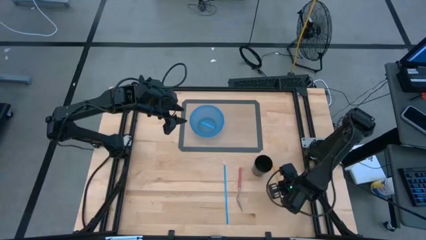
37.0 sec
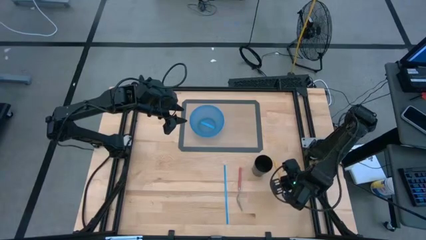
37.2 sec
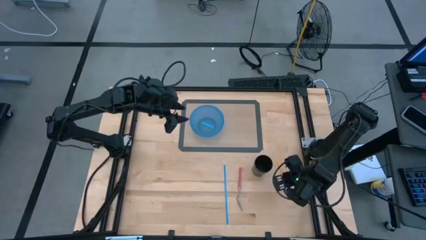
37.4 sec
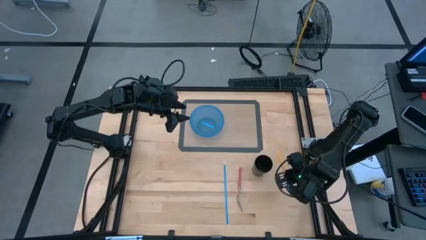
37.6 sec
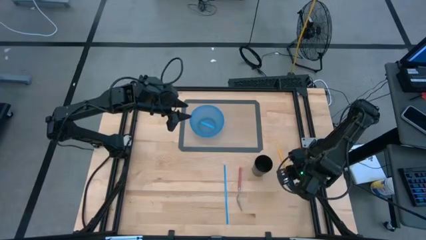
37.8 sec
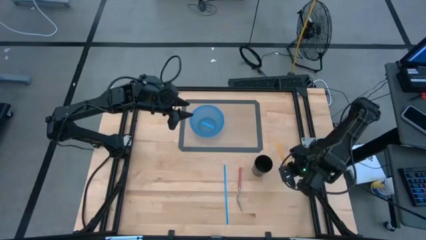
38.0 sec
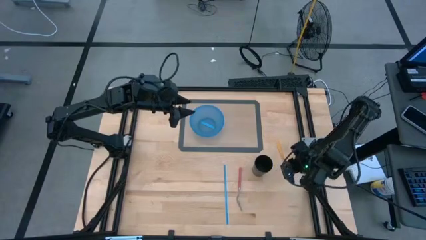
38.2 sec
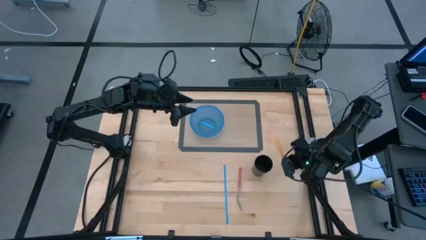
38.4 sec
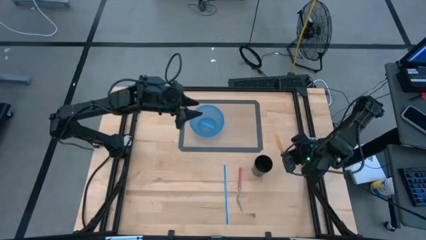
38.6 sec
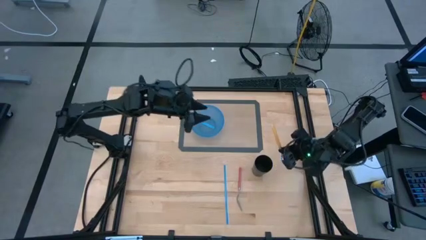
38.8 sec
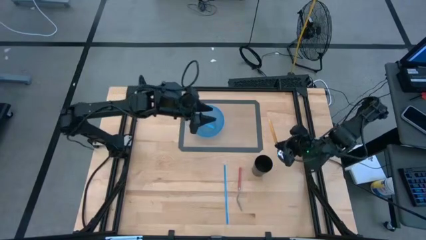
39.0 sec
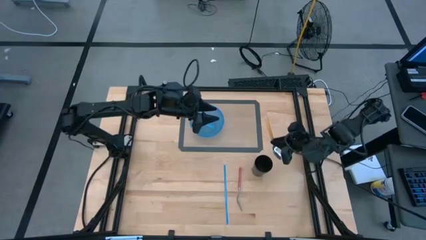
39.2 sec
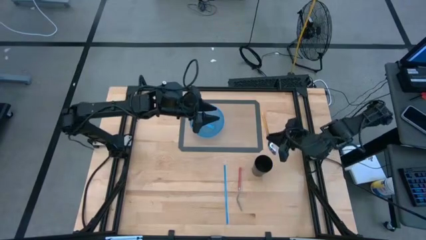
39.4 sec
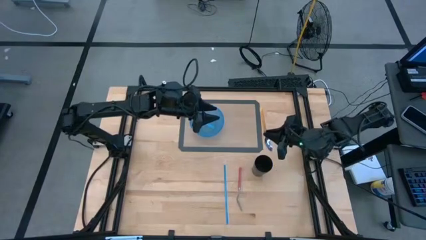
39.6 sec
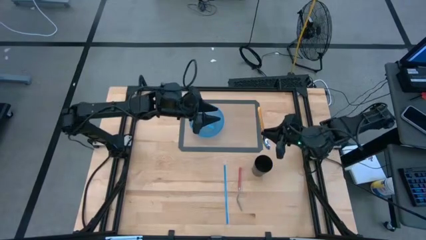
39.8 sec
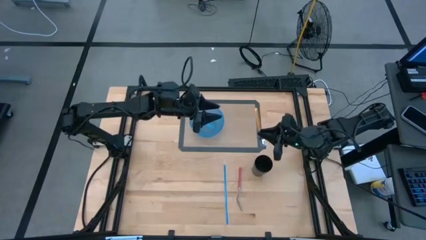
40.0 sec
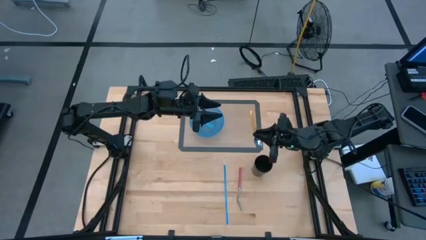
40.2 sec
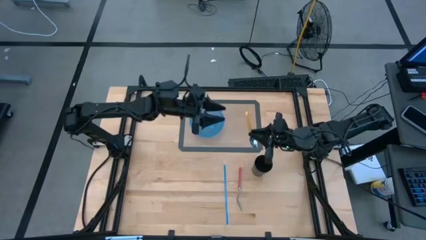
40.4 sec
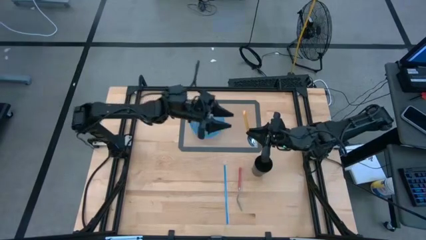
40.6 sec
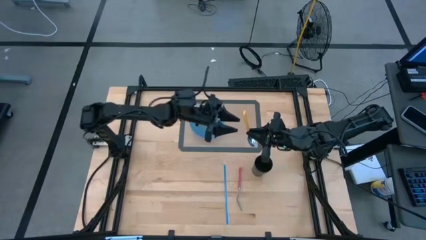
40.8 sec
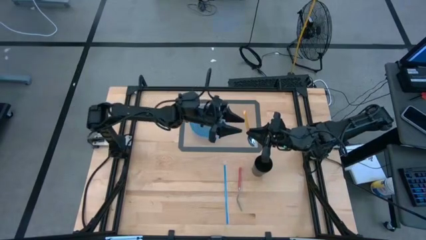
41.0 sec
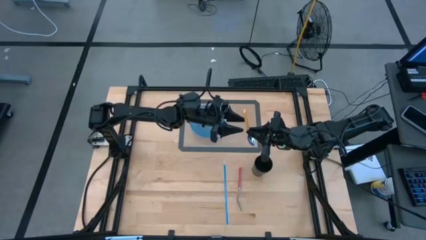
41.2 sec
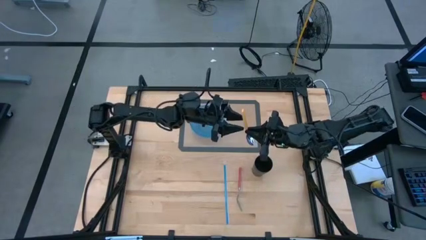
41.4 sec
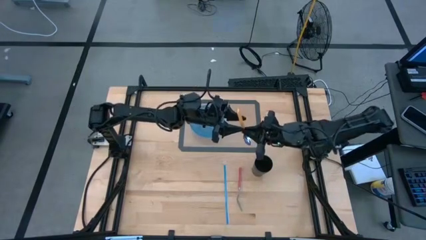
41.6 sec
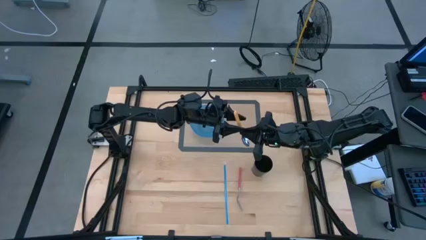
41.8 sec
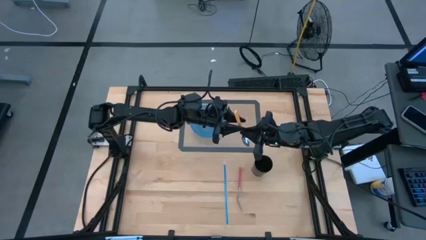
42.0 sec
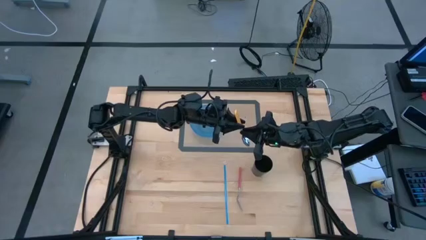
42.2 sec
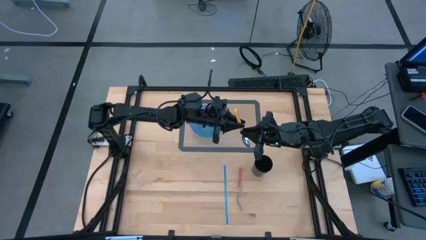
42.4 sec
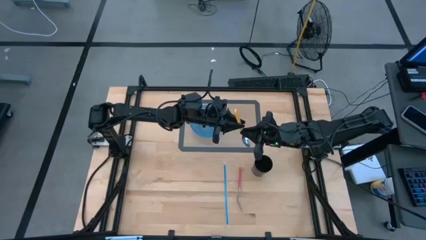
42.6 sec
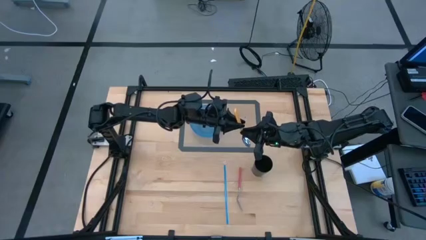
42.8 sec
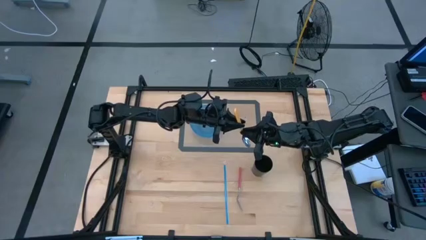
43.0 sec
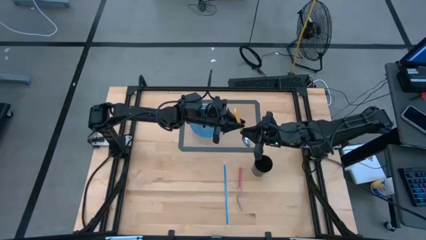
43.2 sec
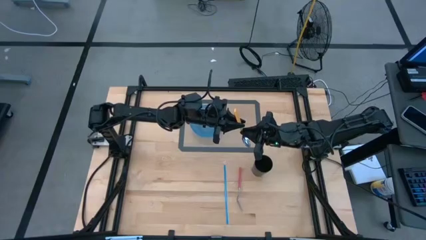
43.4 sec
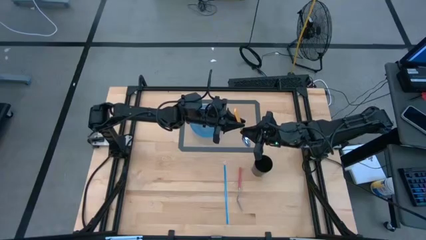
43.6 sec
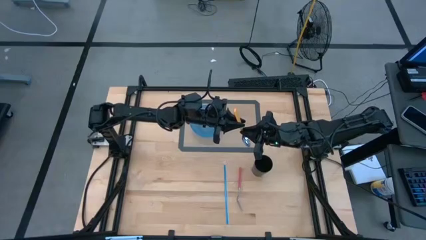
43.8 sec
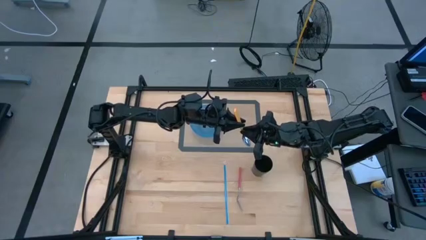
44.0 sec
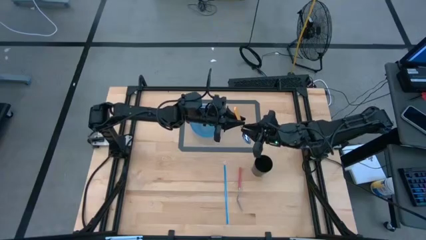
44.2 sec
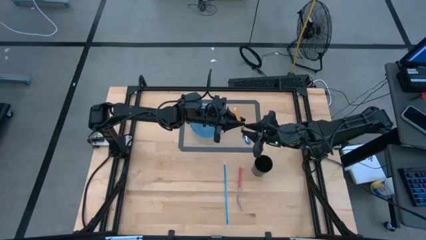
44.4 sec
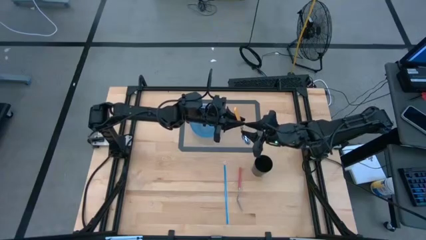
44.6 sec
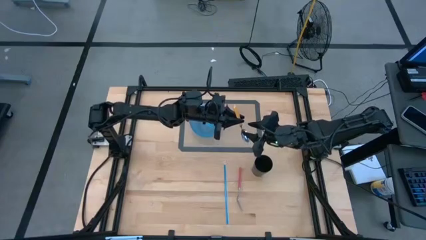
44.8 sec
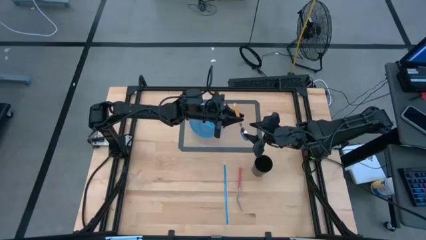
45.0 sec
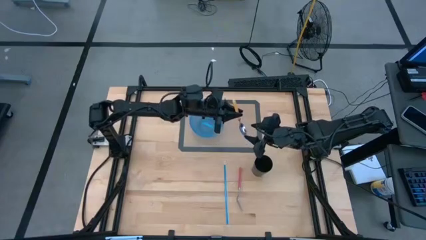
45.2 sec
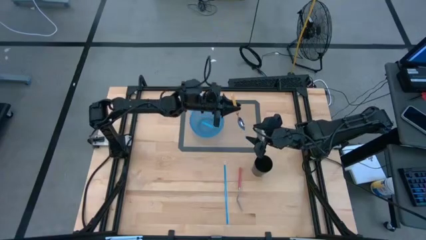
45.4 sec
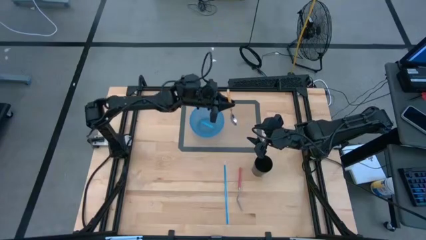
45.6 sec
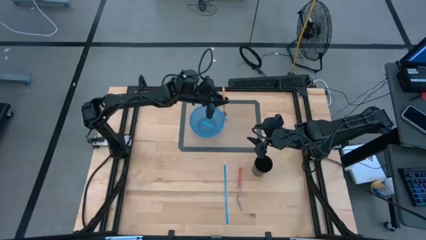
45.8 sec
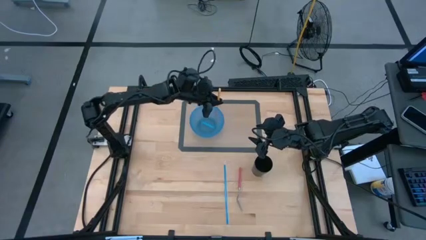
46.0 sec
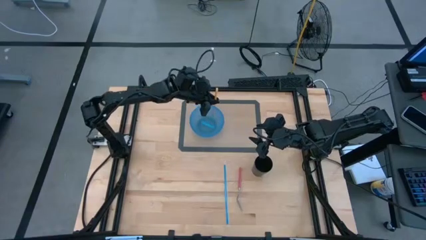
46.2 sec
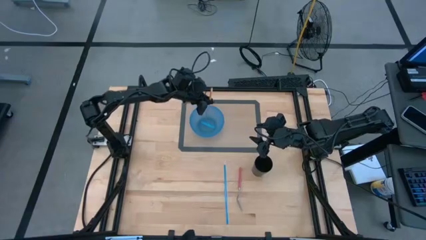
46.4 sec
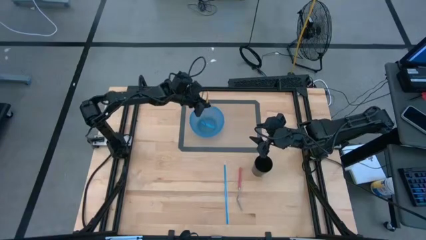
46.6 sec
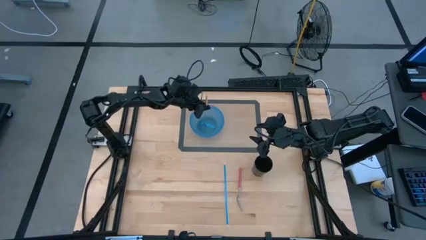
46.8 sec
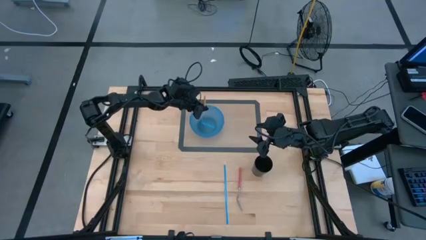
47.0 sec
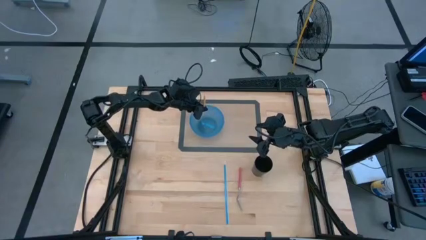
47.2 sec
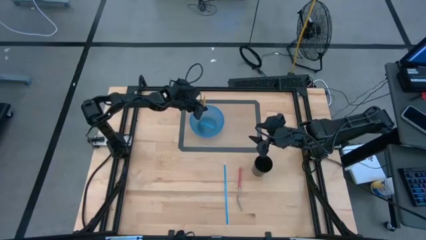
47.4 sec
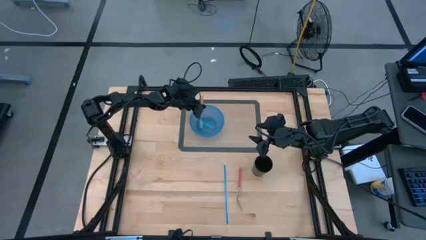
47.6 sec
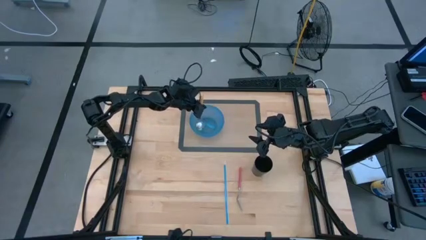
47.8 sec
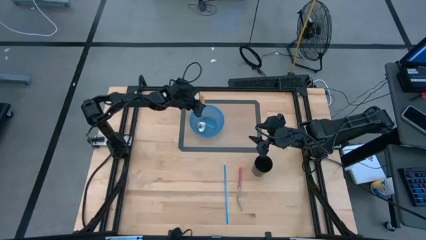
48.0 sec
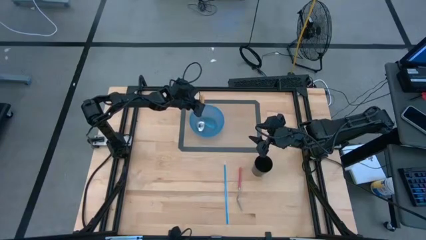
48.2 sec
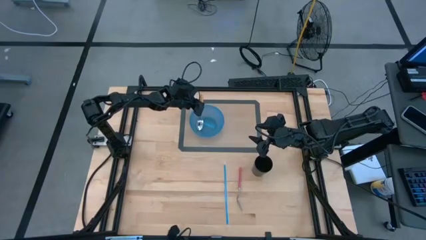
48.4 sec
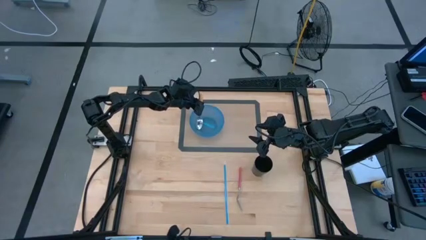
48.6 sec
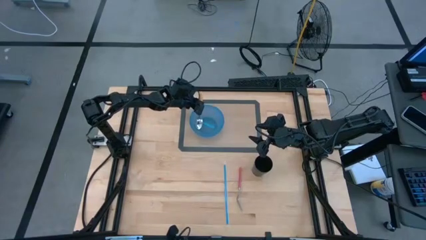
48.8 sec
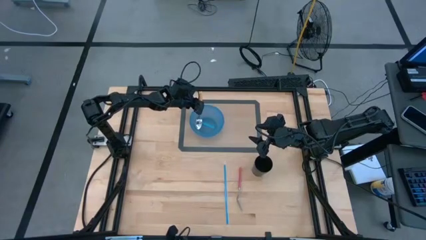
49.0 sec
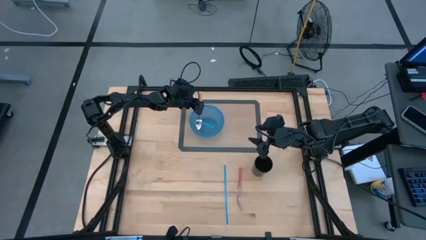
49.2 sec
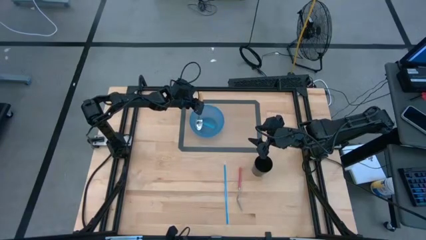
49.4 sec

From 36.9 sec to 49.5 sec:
Task: Pick & Place Utensil
Put the yellow spoon into the bowl
